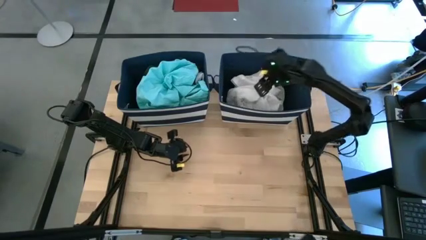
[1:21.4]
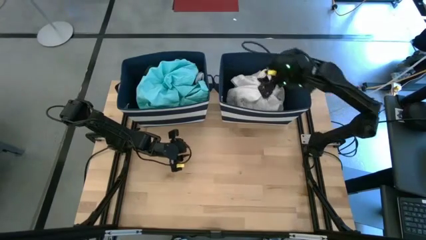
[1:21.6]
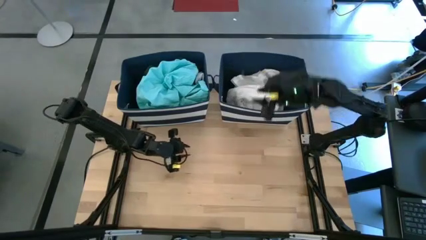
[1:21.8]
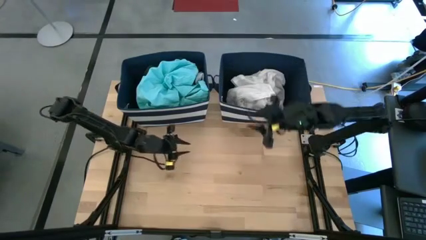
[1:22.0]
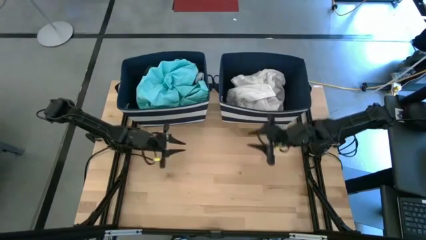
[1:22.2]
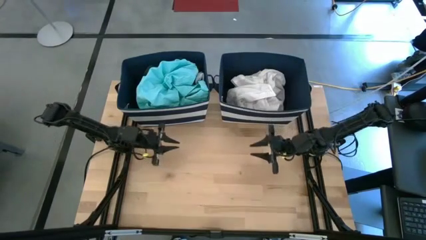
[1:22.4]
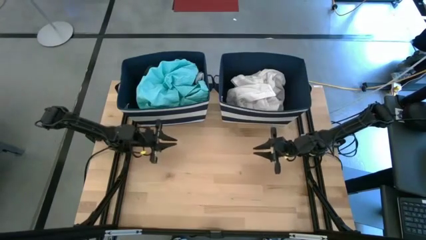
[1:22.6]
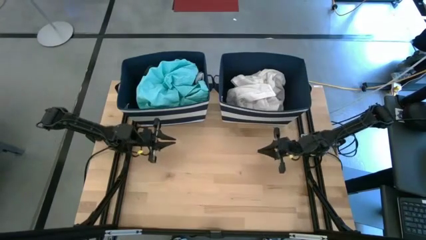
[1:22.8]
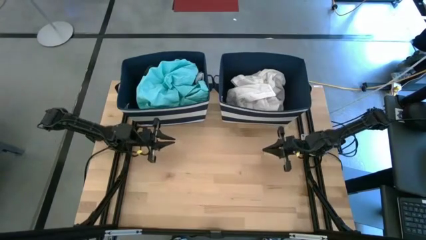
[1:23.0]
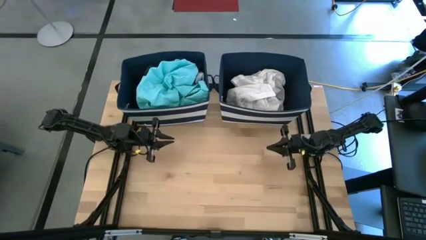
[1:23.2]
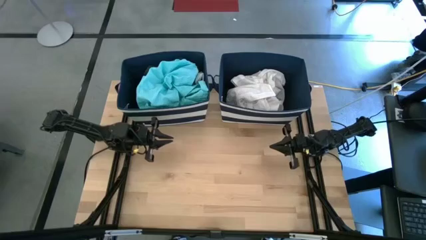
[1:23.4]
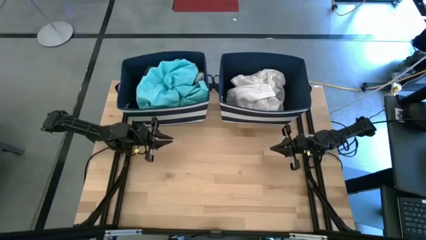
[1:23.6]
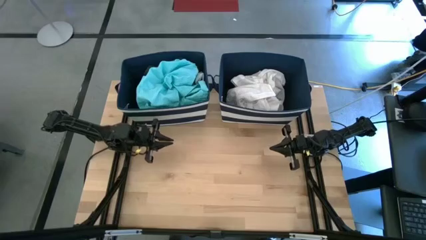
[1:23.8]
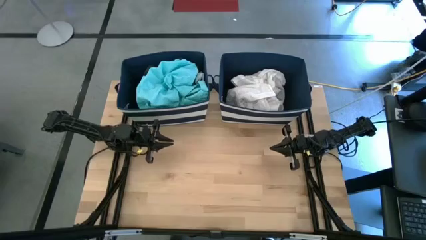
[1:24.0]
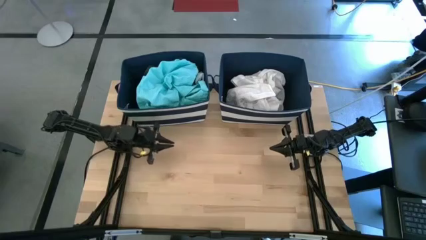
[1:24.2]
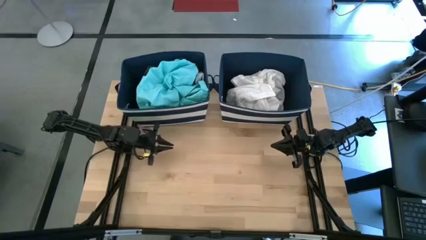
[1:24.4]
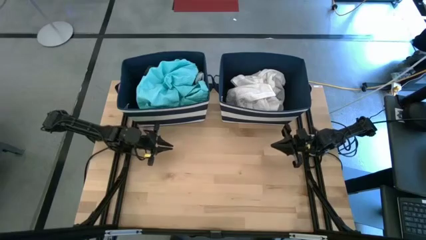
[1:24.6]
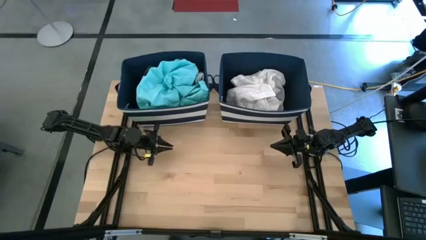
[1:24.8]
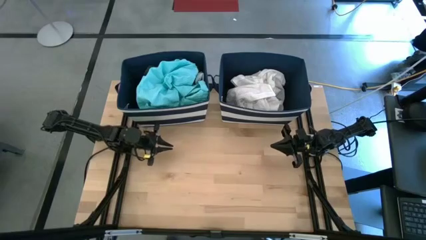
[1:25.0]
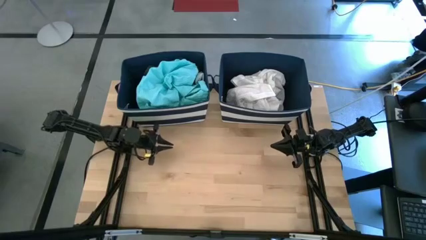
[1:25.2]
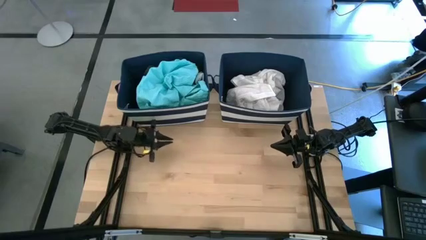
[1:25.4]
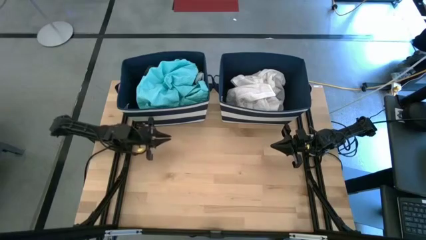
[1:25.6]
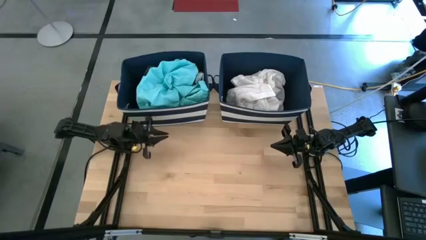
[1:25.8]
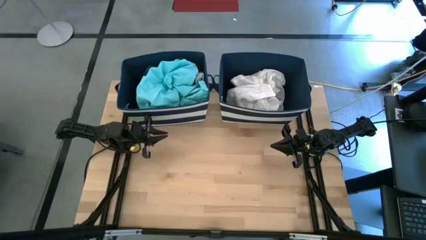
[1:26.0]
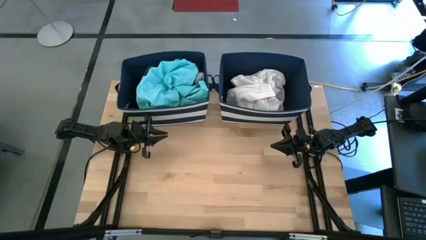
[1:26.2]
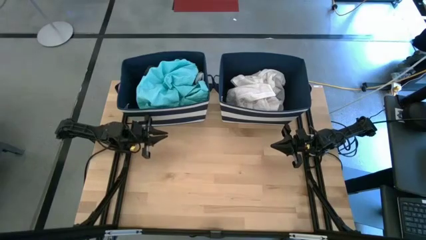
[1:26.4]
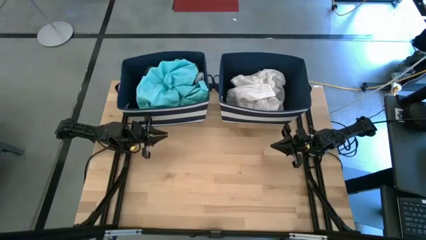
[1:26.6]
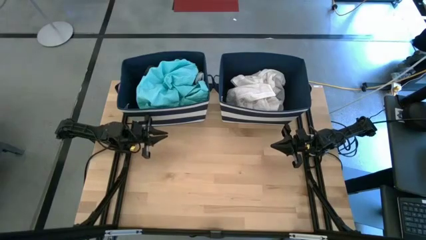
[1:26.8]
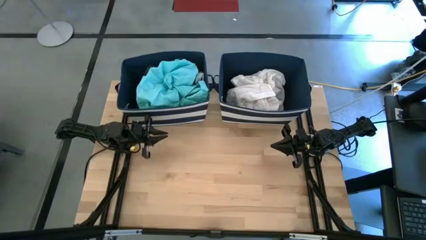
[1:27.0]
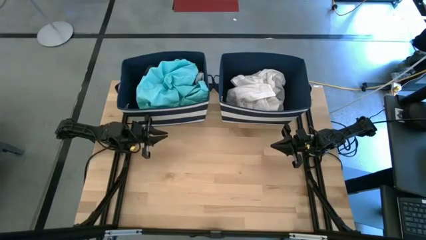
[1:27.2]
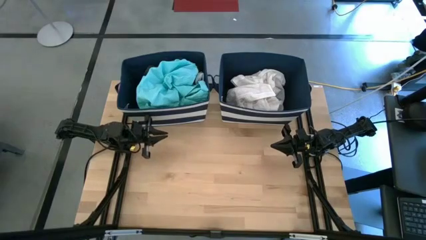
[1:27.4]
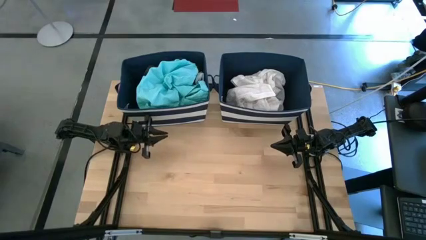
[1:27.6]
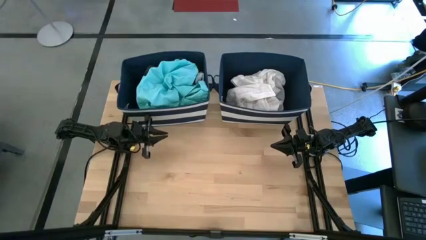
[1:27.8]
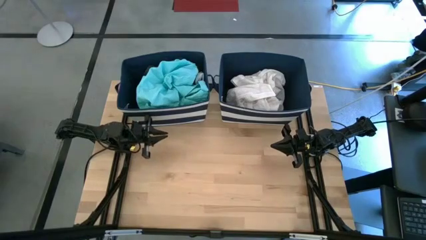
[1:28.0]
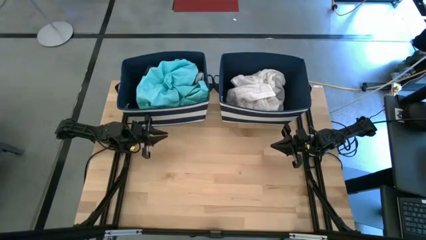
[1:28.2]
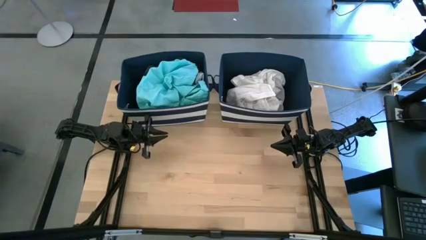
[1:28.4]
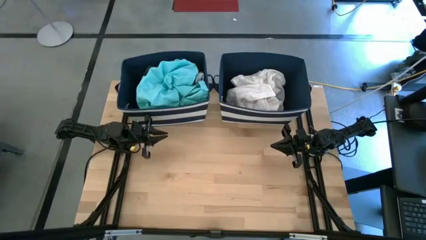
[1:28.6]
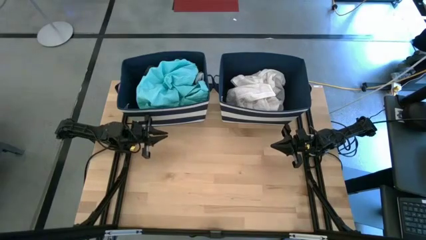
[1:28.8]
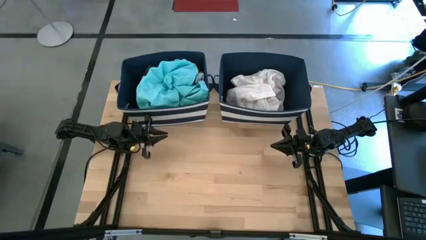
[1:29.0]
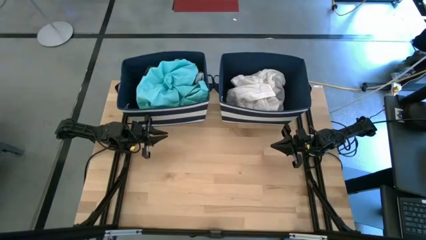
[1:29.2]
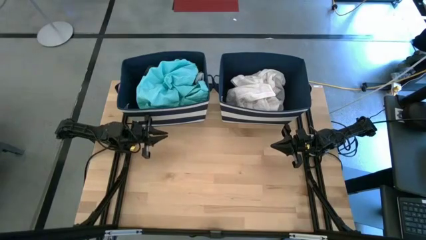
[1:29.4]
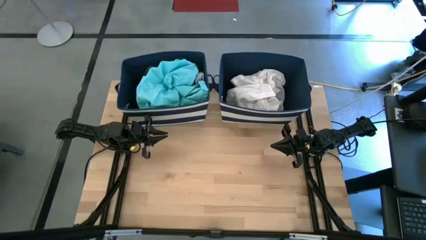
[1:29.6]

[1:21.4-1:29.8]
Task: Sort clothes
Return to Home Position

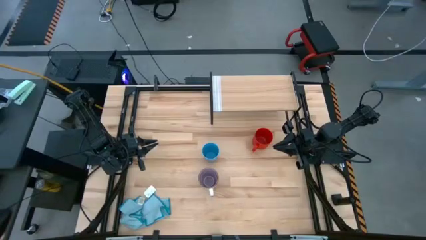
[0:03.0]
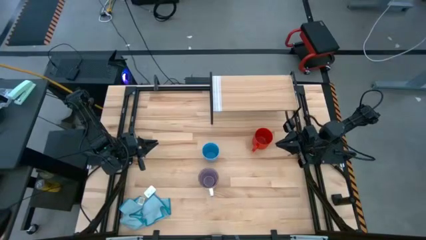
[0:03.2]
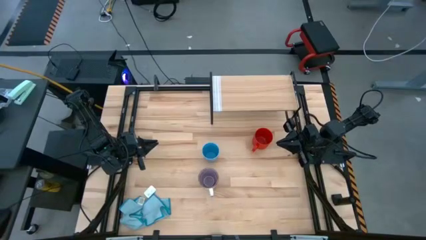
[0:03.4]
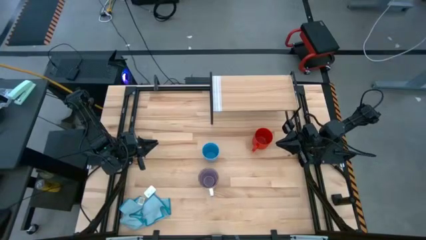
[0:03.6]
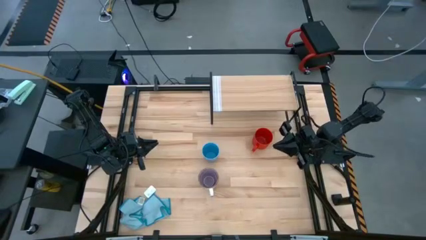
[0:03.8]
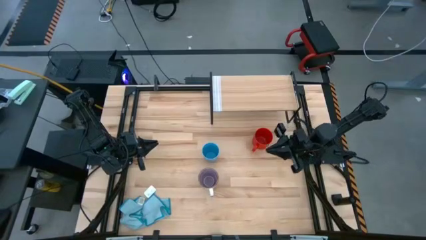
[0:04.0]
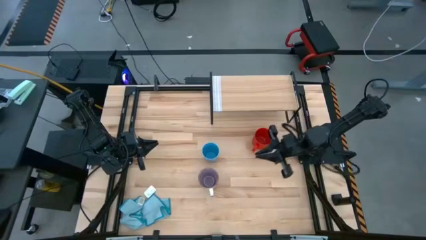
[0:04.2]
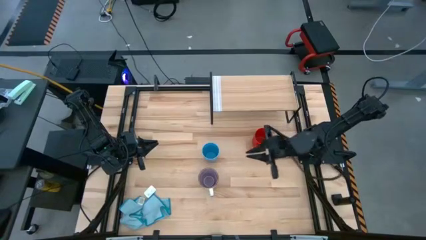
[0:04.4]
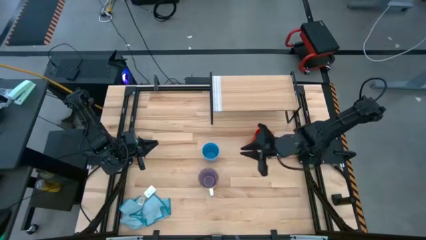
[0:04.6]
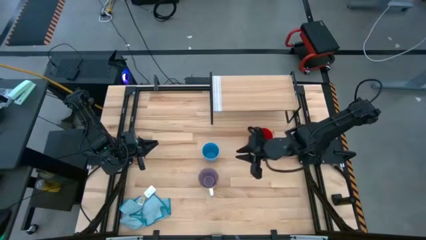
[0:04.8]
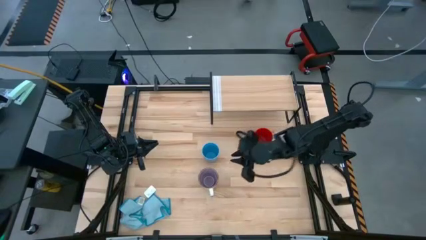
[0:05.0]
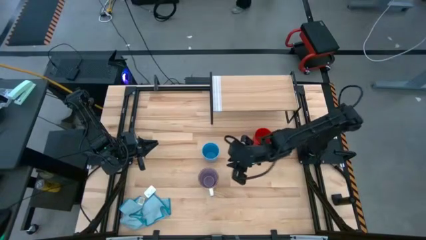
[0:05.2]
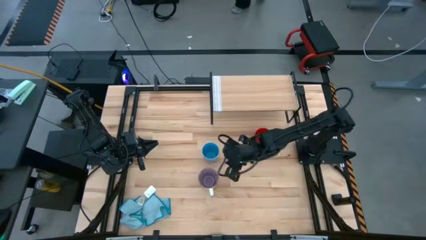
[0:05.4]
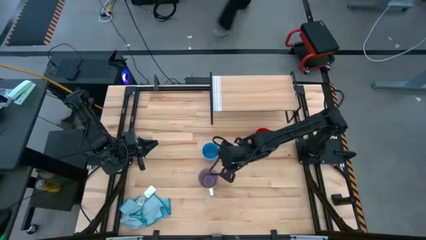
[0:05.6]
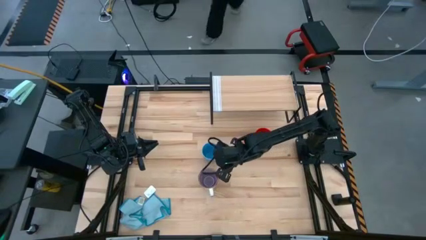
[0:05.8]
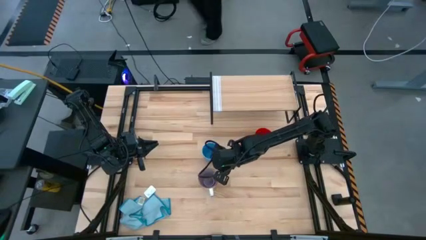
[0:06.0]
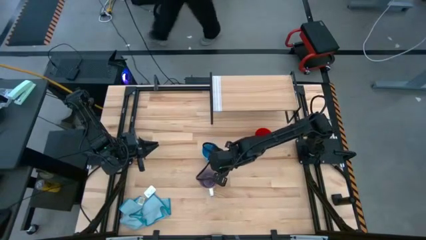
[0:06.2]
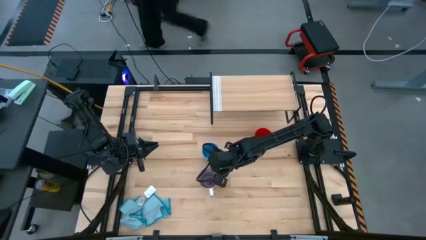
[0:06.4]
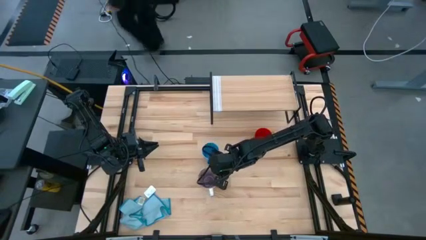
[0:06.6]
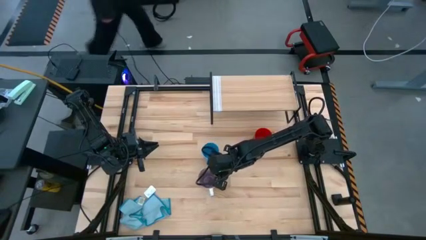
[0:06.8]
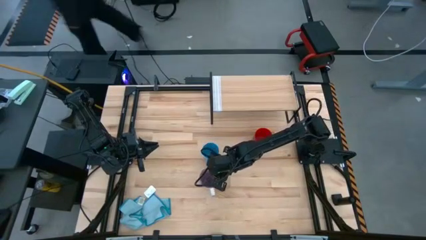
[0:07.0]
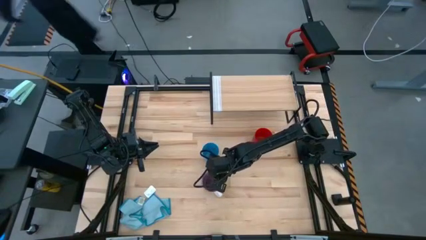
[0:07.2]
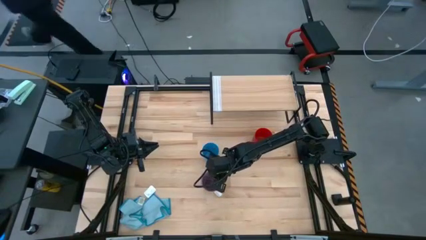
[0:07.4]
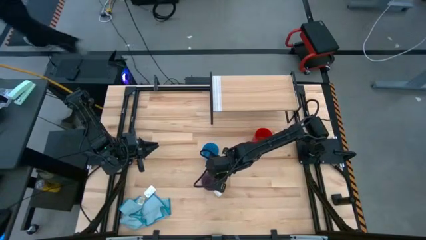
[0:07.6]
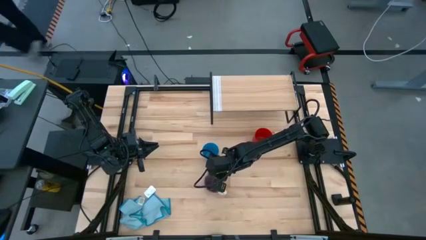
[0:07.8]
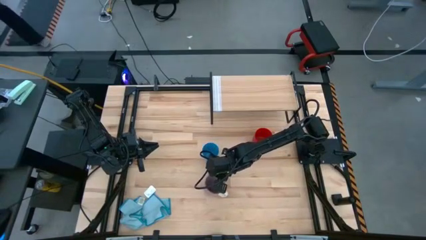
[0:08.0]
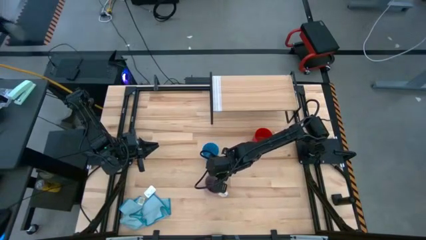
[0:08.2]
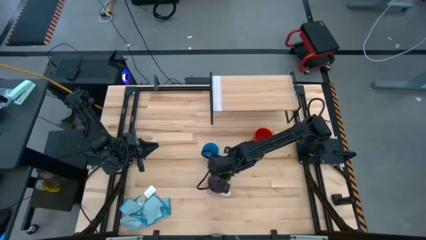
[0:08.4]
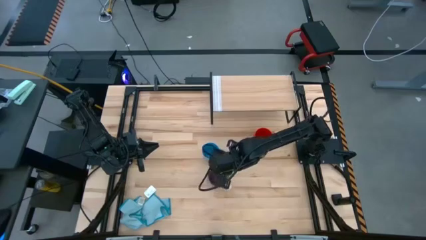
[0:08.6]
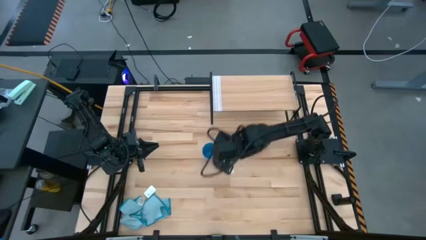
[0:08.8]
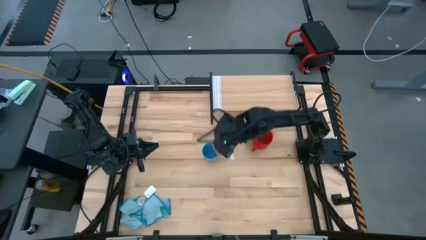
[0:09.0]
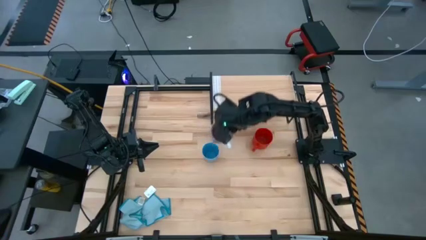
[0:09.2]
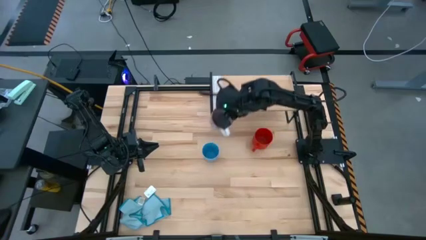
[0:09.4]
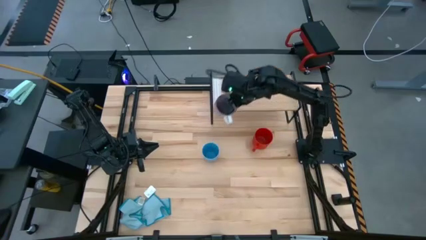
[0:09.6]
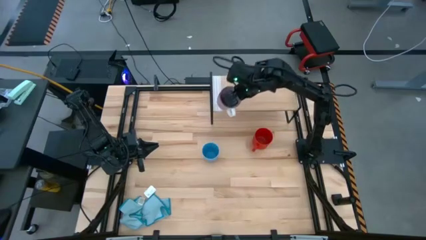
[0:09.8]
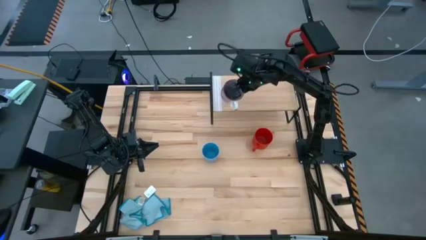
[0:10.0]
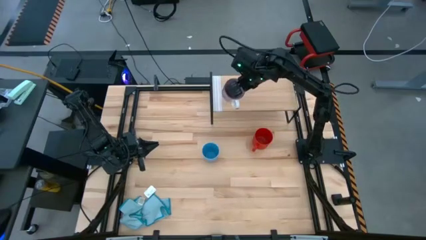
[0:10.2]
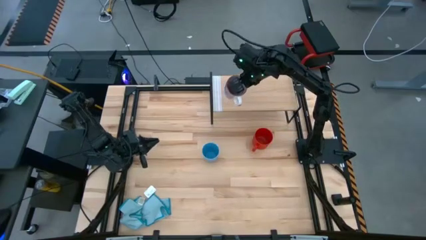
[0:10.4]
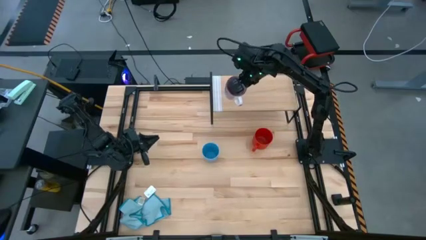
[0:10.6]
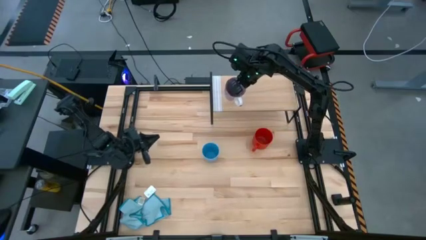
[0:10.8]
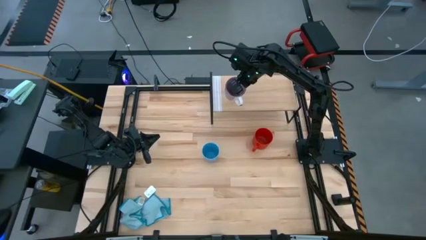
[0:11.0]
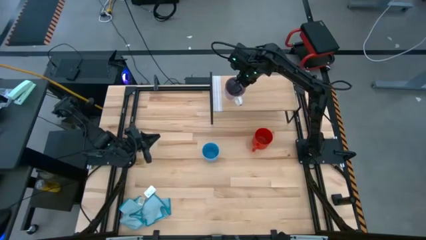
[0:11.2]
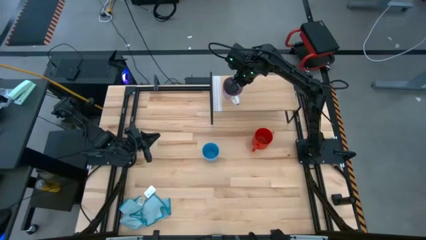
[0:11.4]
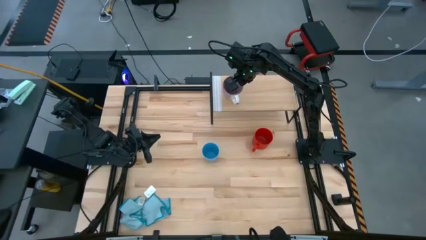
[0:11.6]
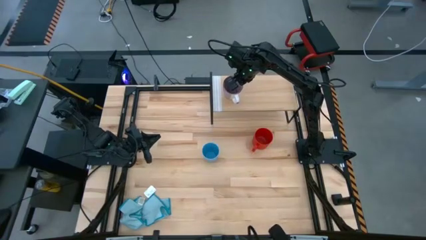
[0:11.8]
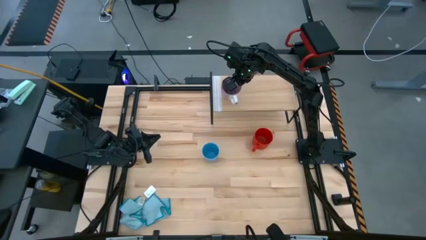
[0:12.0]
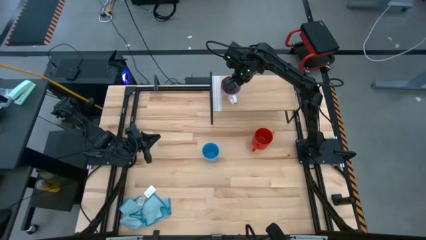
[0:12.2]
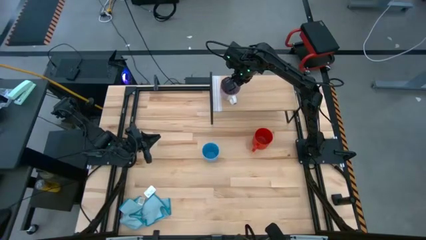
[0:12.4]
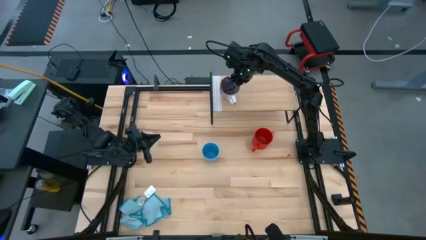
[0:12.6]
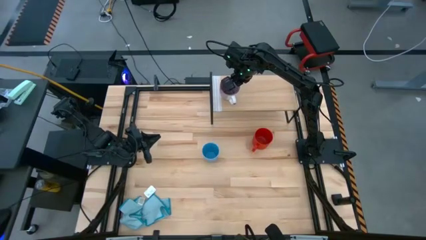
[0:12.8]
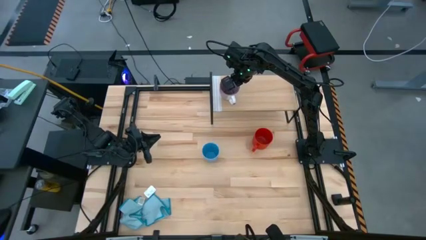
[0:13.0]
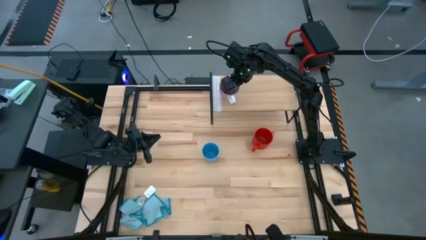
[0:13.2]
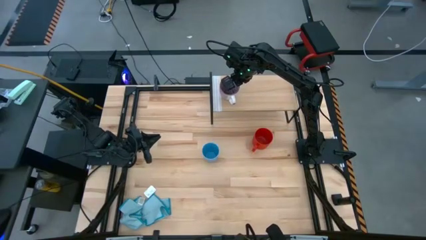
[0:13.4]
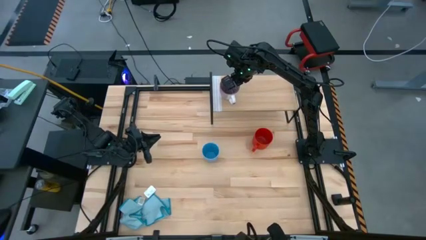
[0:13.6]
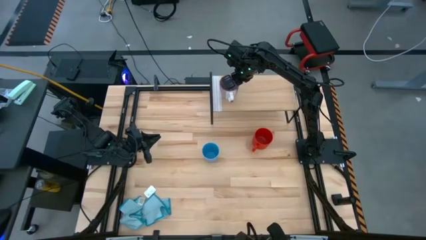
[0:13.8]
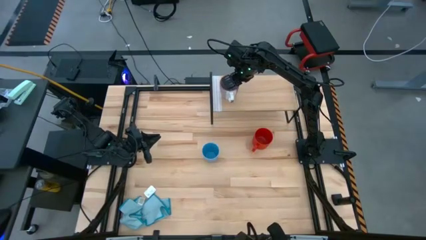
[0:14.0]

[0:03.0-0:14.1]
Task: Stack small to large cups/mugs on shelf
Put the purple mug on the shelf
